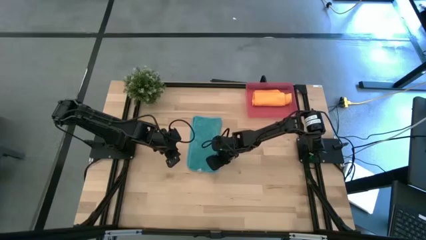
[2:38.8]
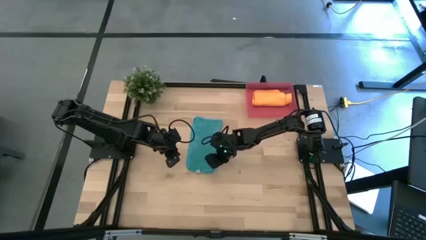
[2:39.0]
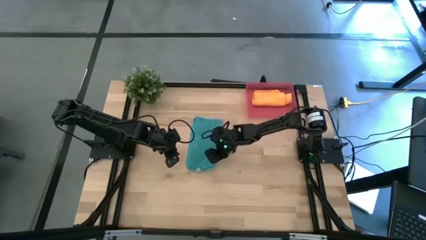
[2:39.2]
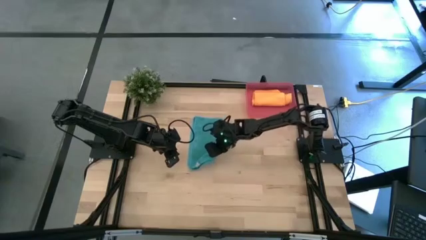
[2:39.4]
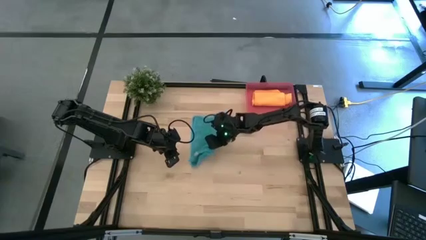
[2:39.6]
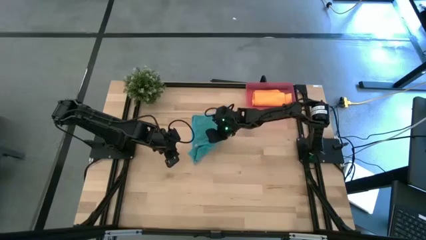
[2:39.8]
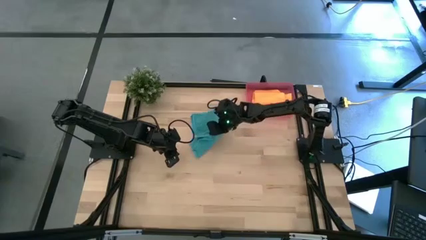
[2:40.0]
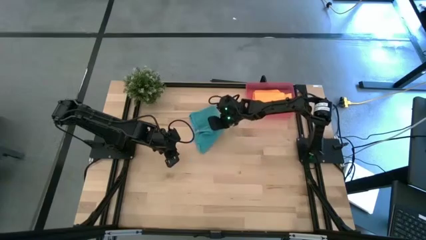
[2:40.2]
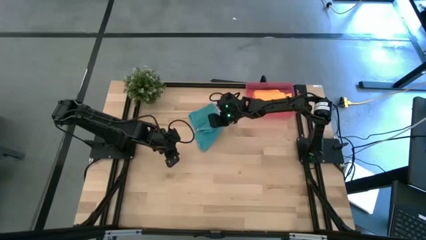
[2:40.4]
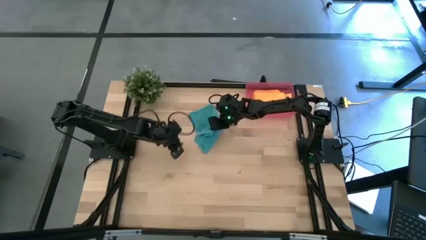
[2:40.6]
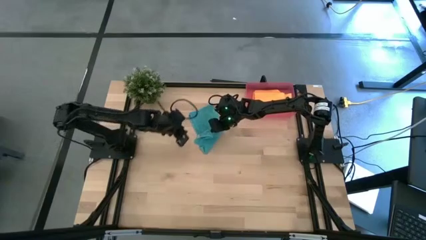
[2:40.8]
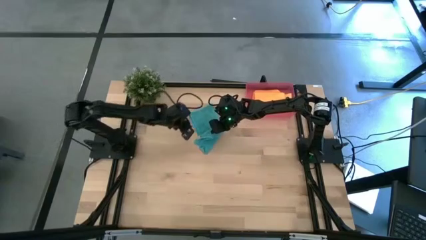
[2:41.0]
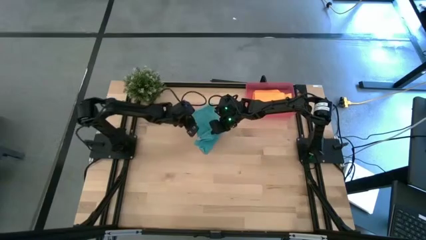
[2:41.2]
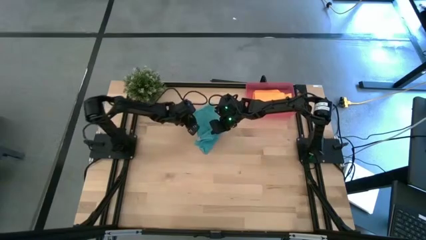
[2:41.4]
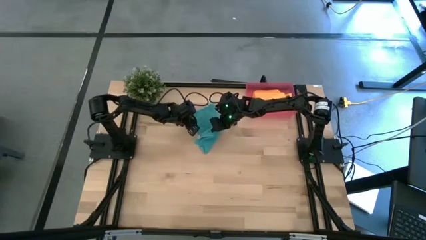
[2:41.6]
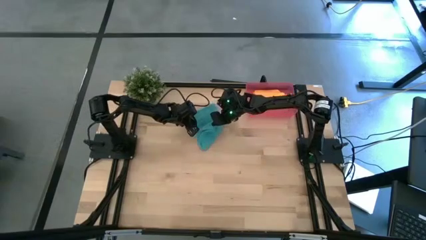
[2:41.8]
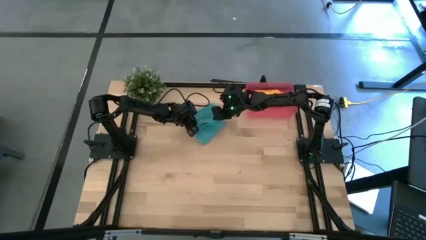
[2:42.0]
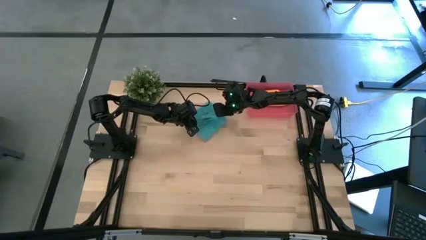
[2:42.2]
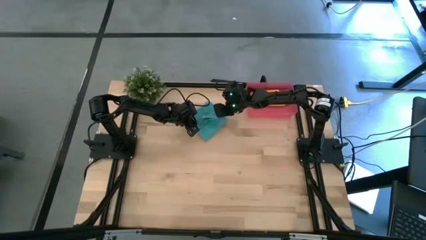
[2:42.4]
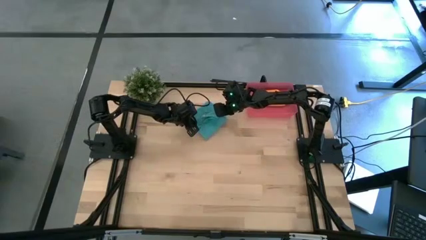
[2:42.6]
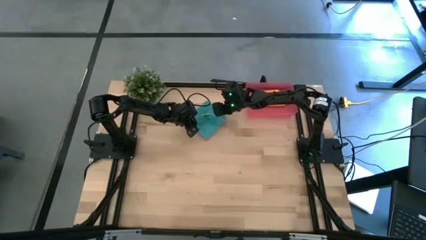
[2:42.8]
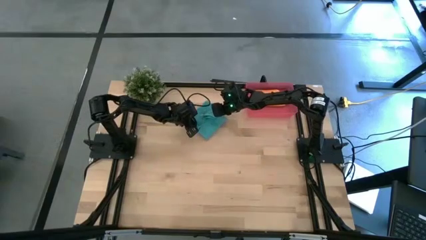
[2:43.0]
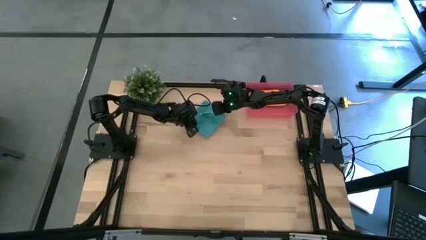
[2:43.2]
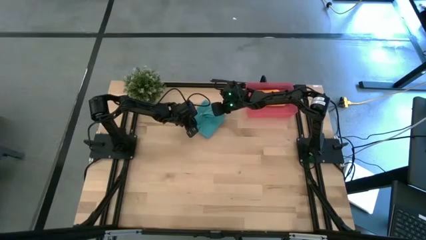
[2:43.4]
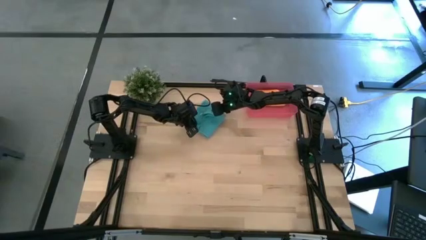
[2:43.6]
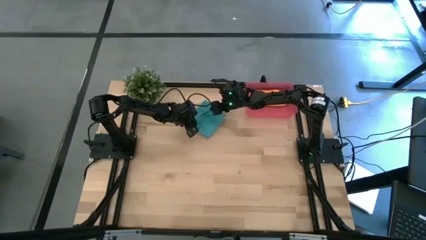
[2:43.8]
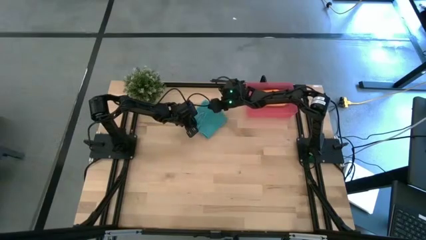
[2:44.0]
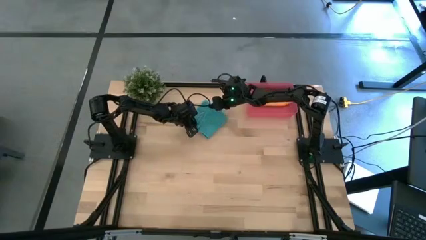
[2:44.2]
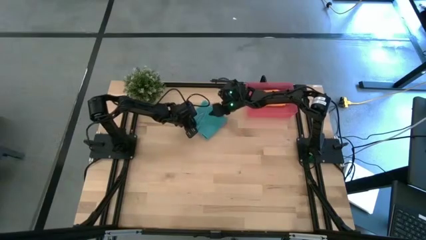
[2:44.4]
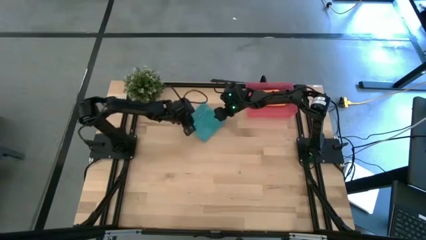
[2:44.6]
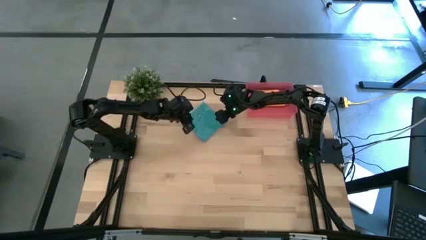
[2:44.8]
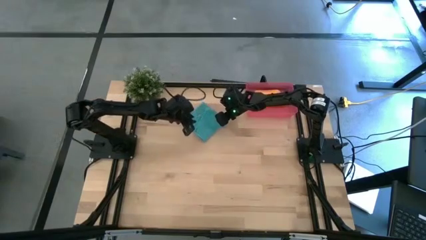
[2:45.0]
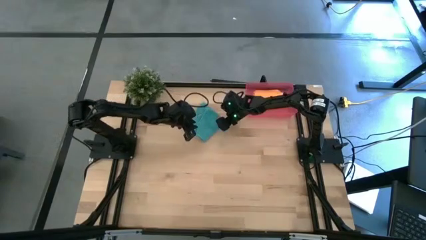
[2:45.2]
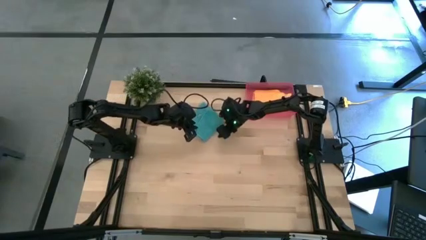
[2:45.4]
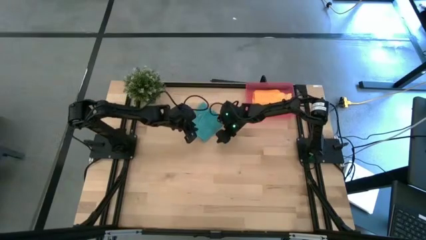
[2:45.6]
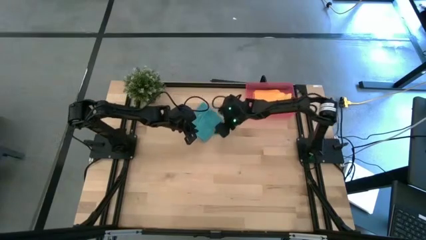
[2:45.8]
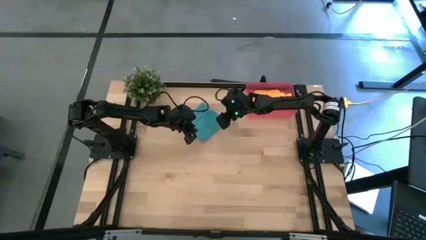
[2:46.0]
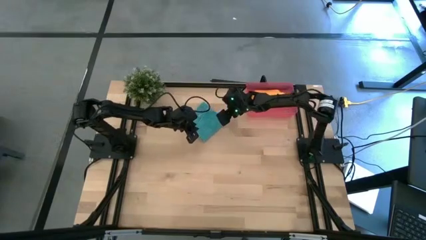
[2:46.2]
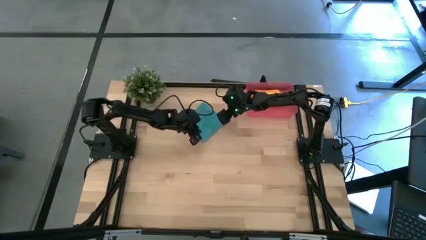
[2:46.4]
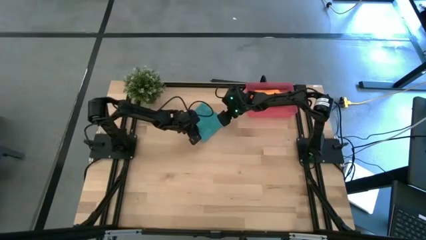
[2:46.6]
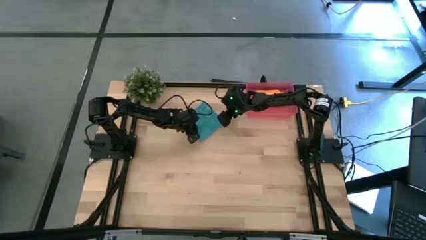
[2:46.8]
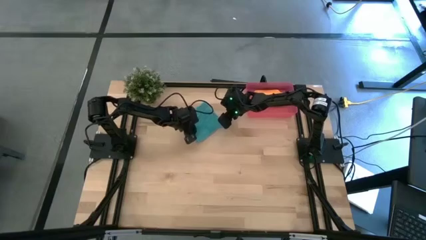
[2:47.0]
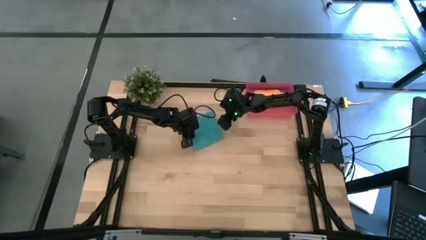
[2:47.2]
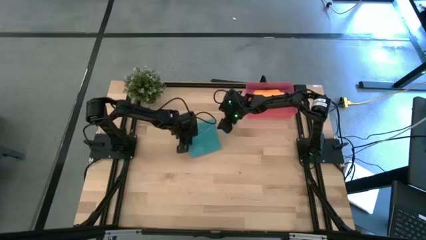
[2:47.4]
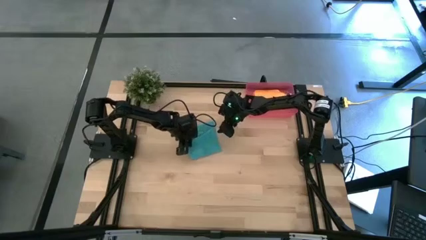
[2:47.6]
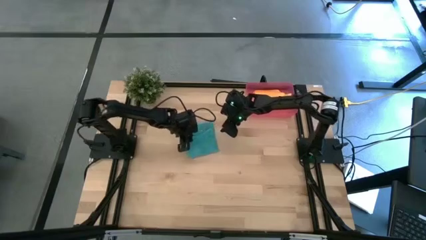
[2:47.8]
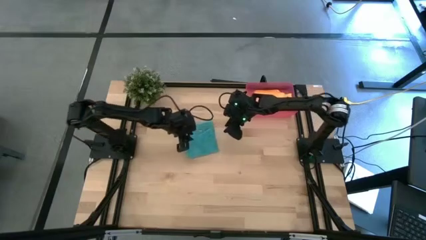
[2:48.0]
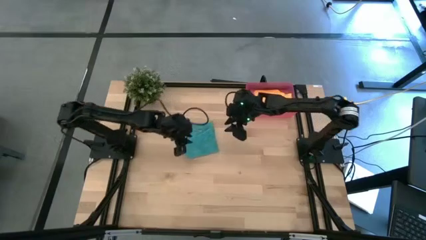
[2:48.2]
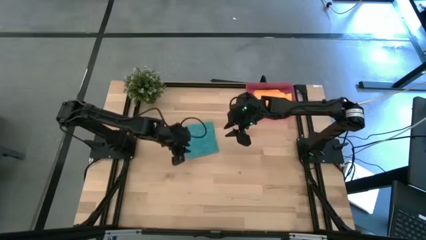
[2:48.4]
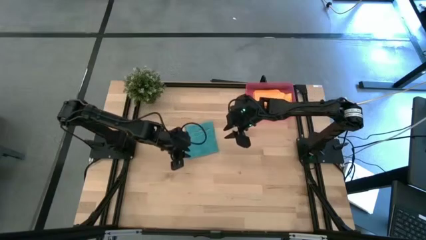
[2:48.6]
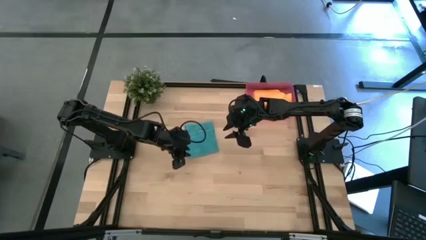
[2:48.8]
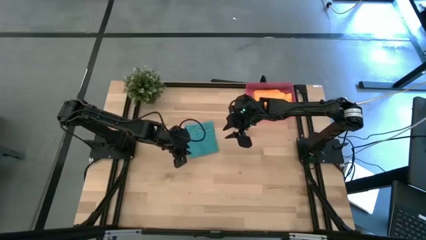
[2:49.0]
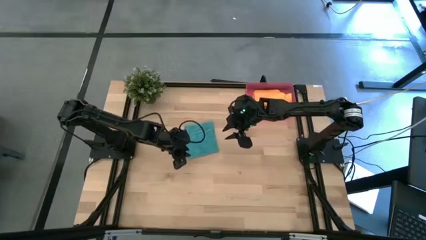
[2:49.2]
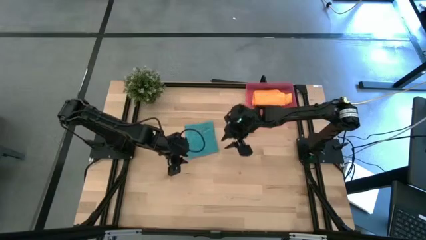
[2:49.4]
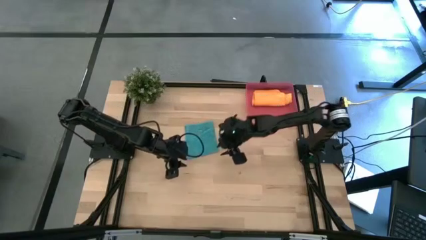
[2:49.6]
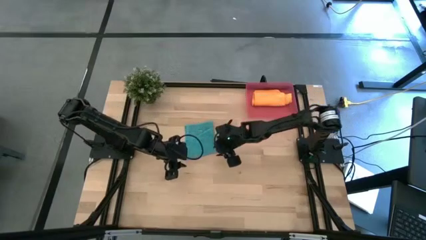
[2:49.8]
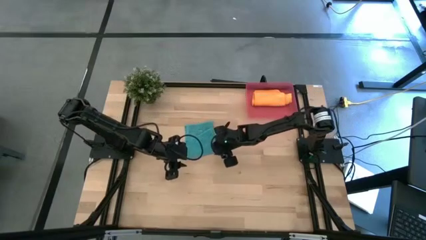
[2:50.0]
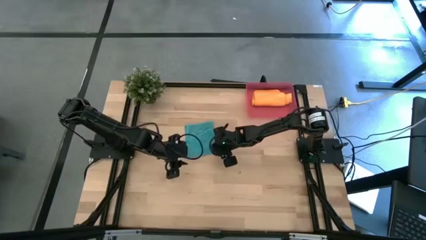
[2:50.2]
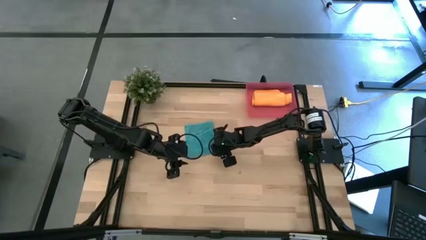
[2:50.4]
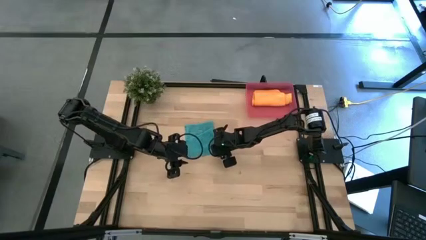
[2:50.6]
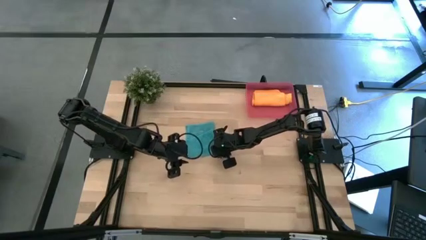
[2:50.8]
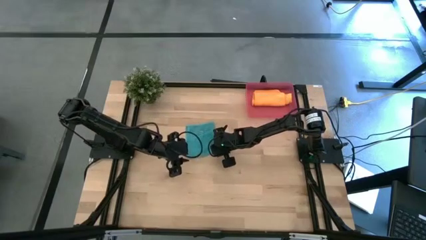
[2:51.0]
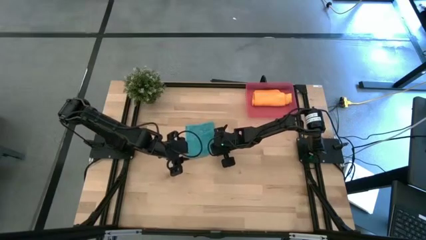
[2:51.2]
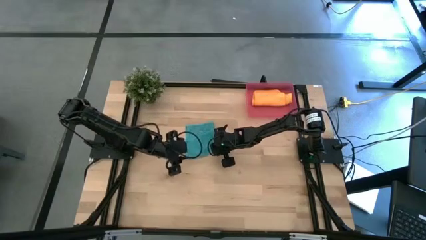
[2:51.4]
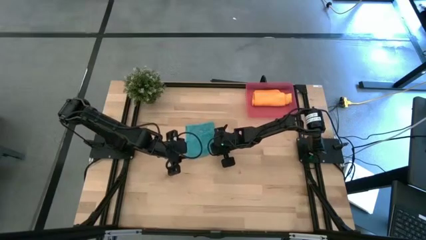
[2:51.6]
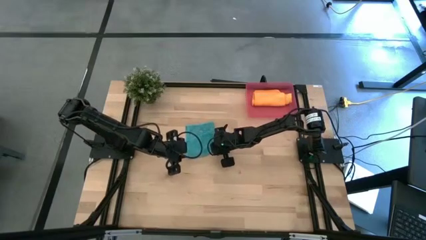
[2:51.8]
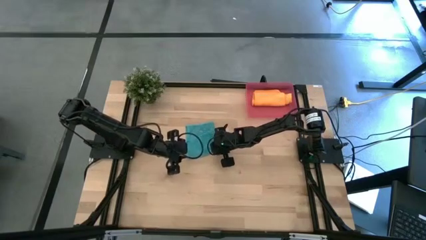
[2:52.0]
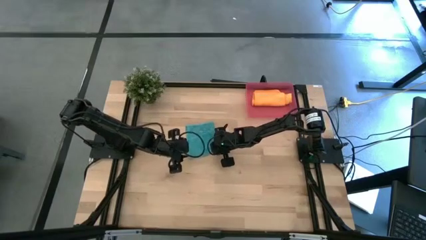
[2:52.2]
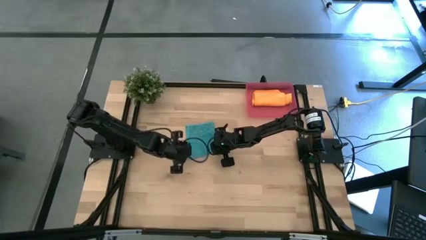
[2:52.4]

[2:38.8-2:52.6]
Task: Roll microfiber towels into tight, uniform cylinder then place into a basket
Fold the blue microfiber towel
